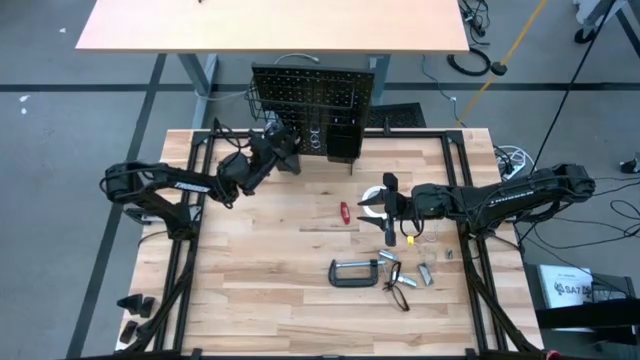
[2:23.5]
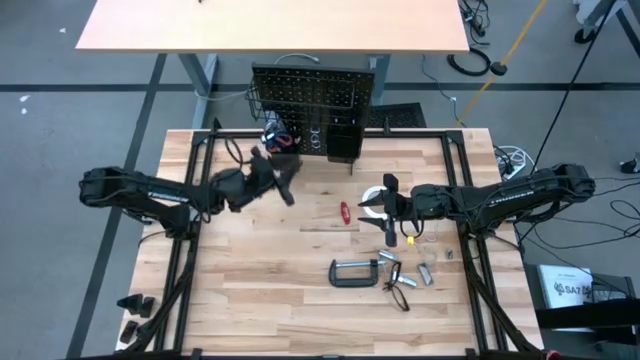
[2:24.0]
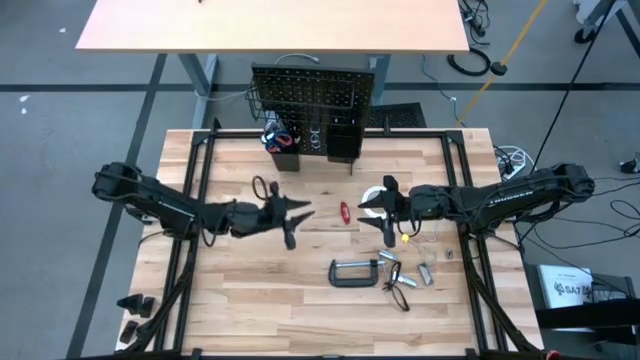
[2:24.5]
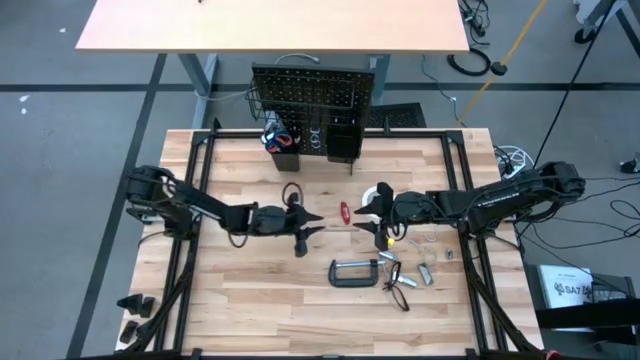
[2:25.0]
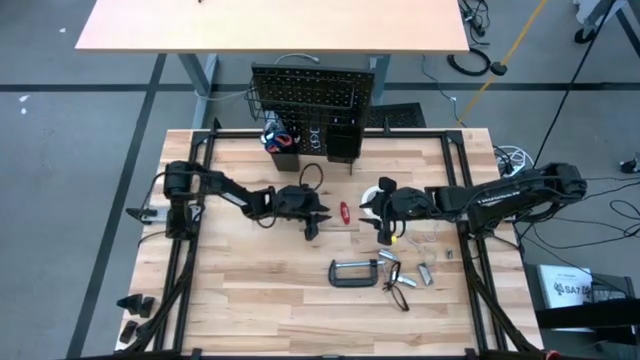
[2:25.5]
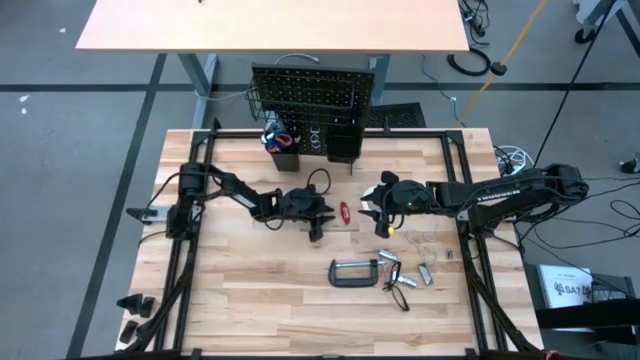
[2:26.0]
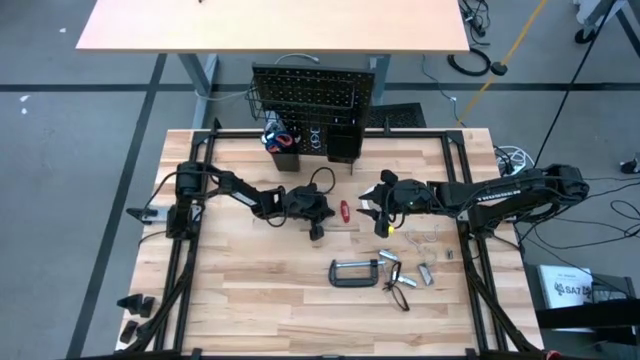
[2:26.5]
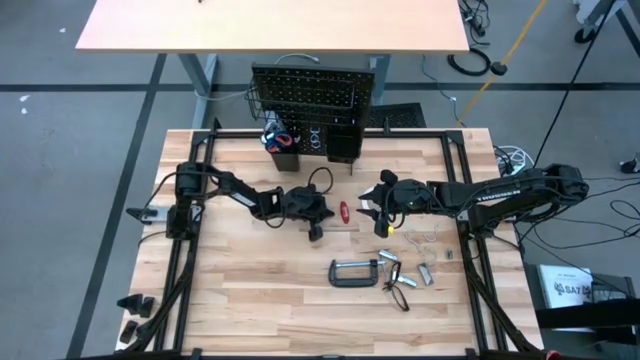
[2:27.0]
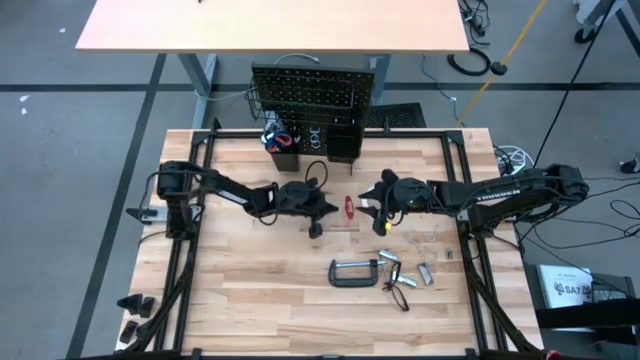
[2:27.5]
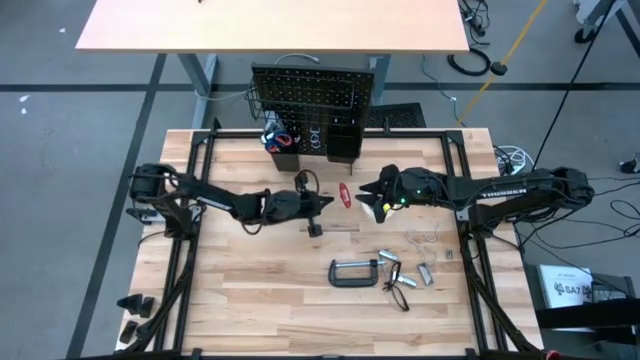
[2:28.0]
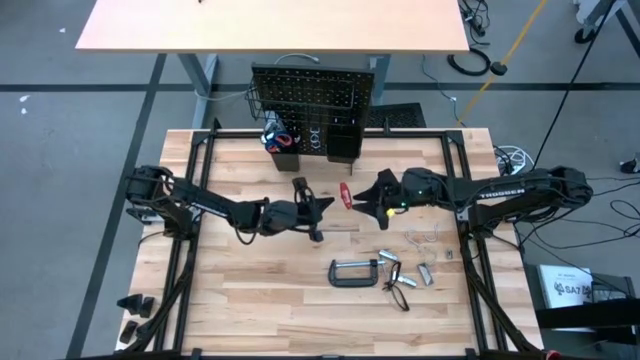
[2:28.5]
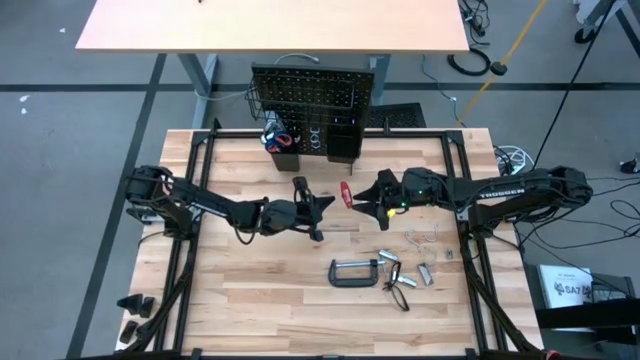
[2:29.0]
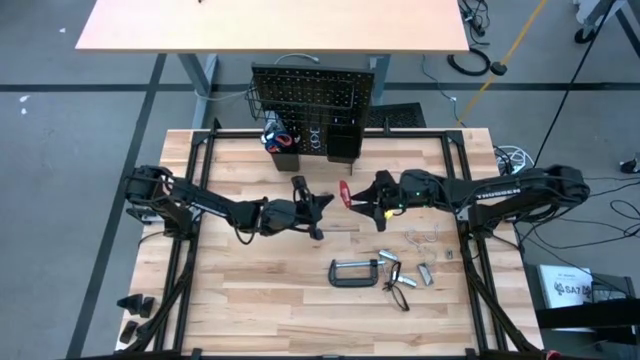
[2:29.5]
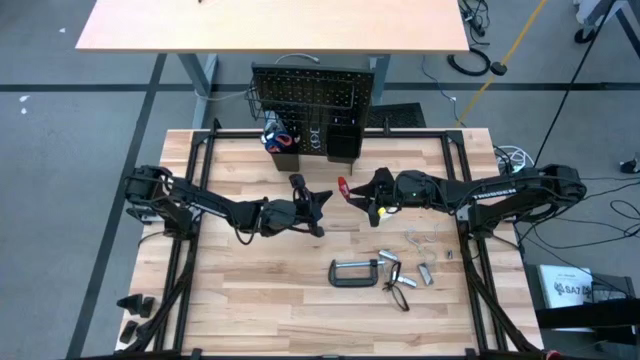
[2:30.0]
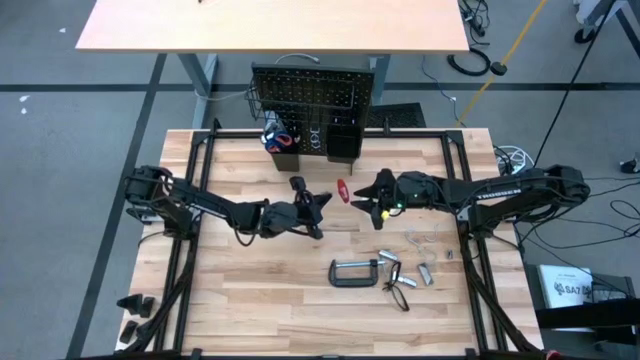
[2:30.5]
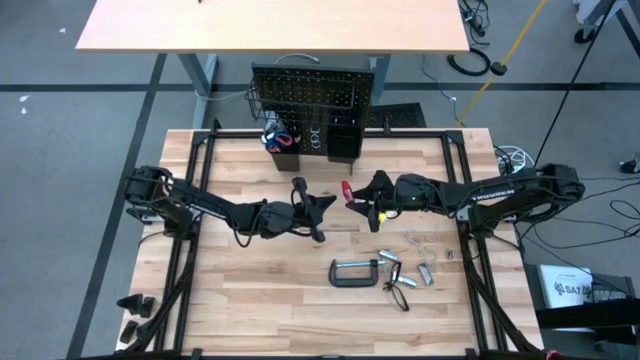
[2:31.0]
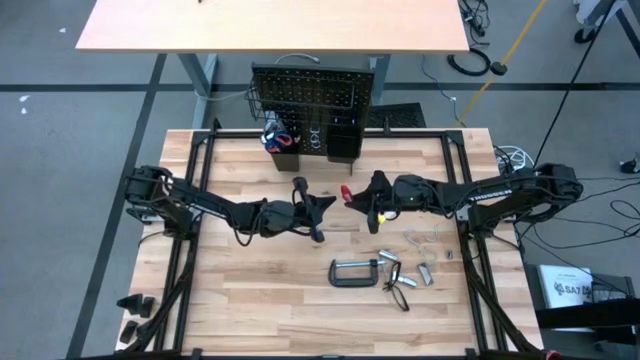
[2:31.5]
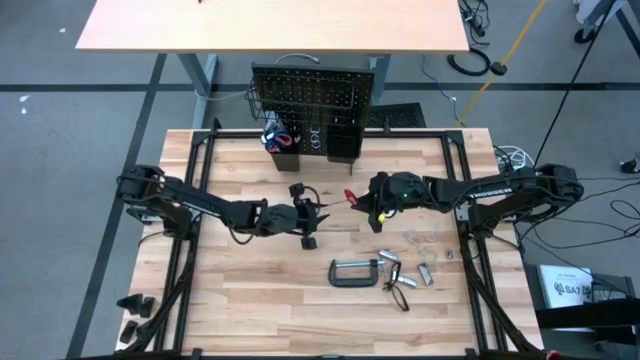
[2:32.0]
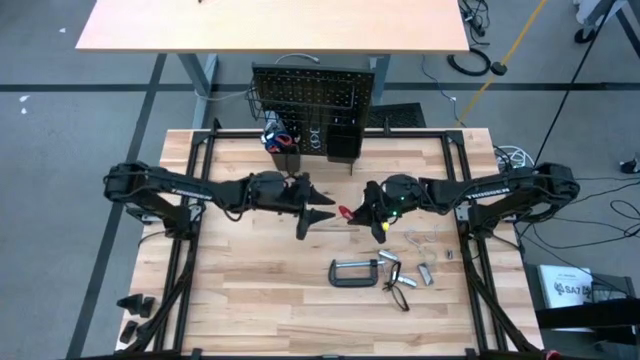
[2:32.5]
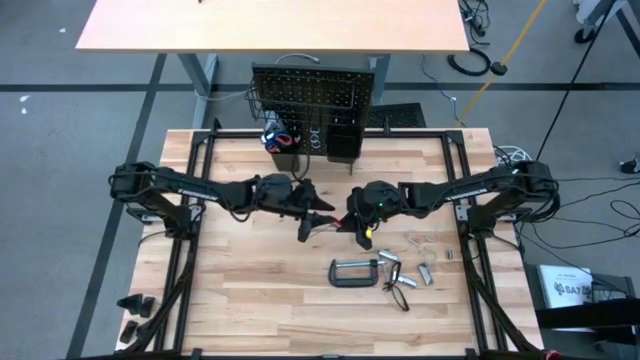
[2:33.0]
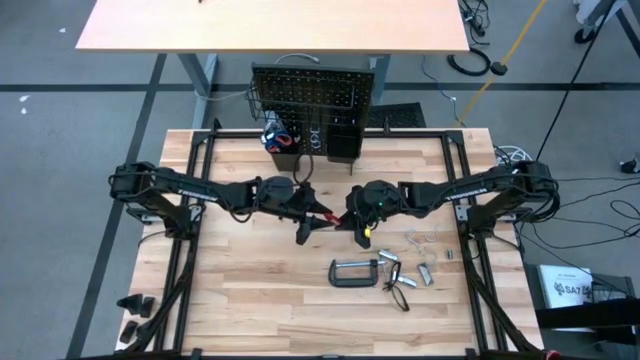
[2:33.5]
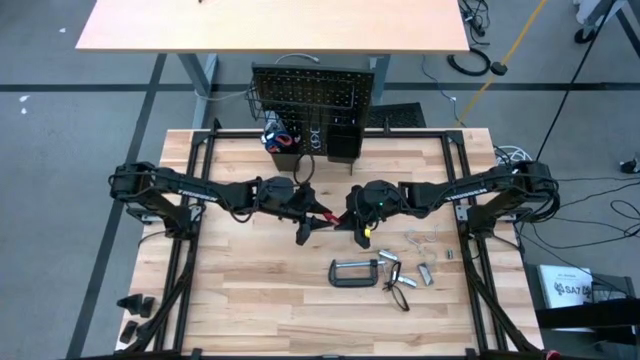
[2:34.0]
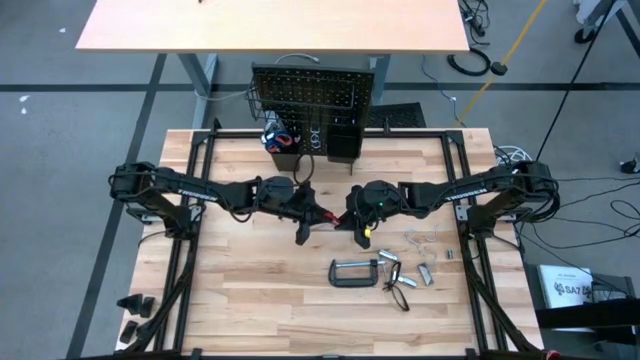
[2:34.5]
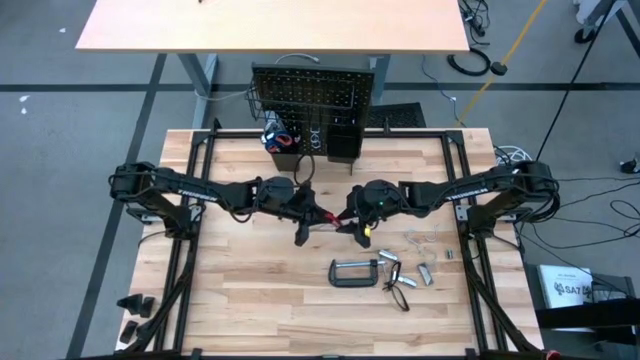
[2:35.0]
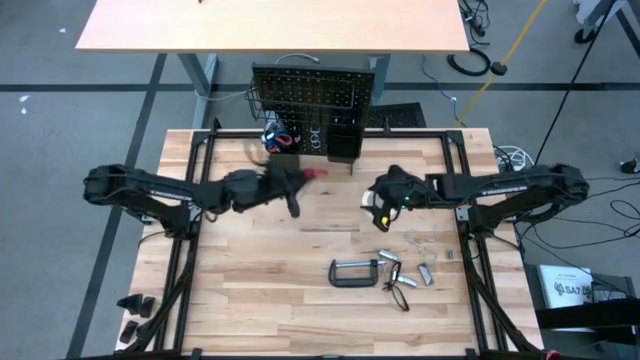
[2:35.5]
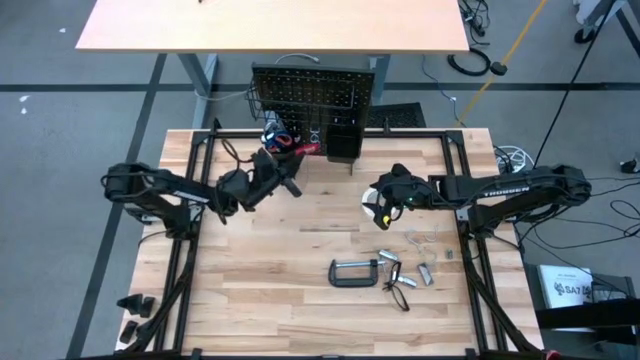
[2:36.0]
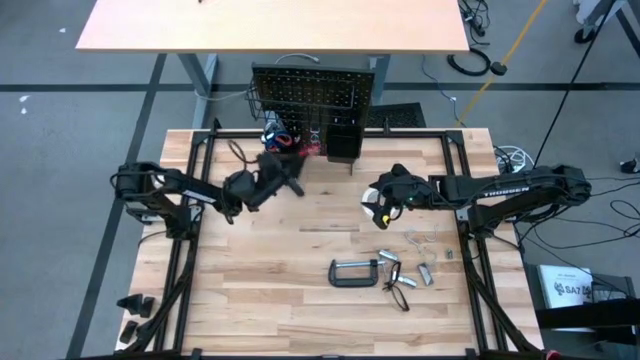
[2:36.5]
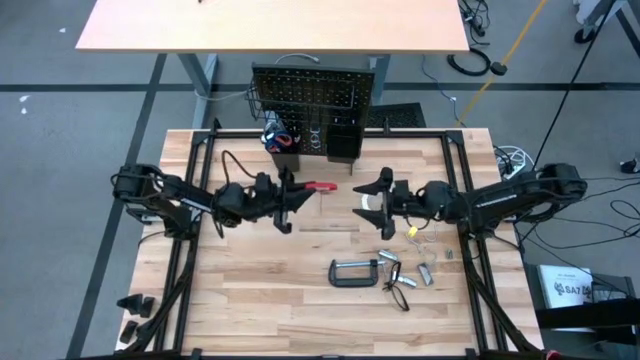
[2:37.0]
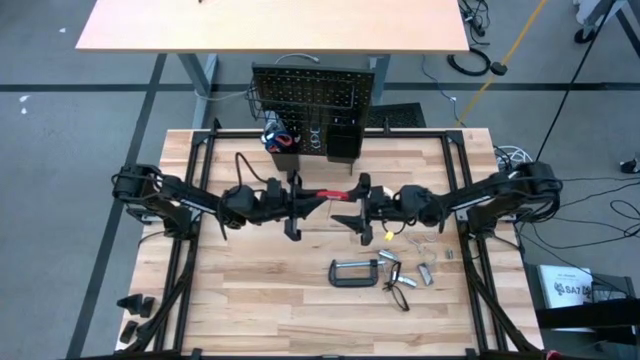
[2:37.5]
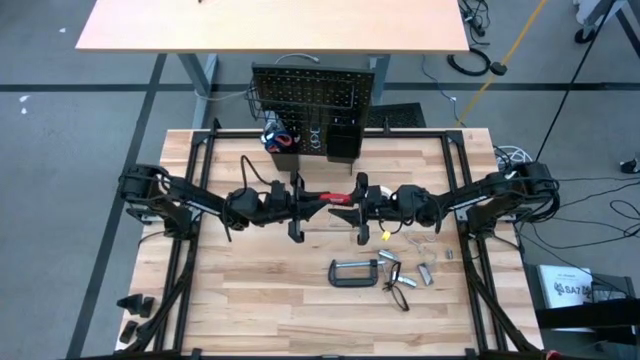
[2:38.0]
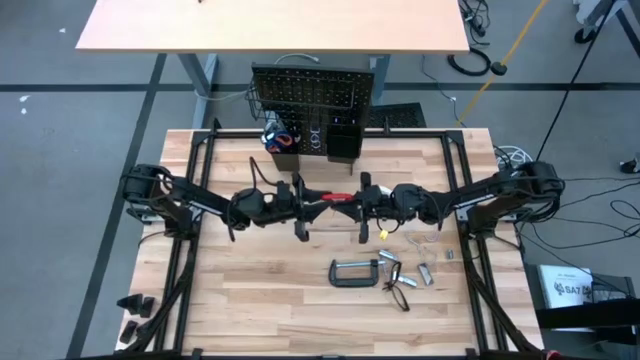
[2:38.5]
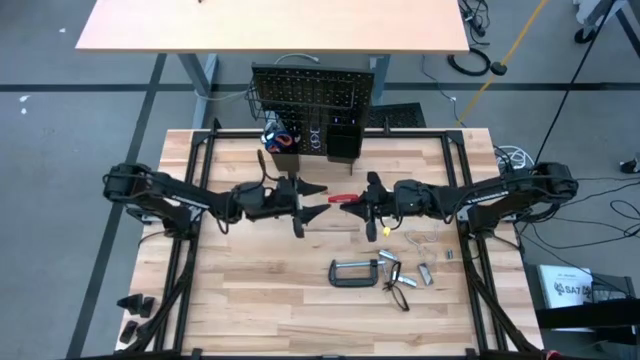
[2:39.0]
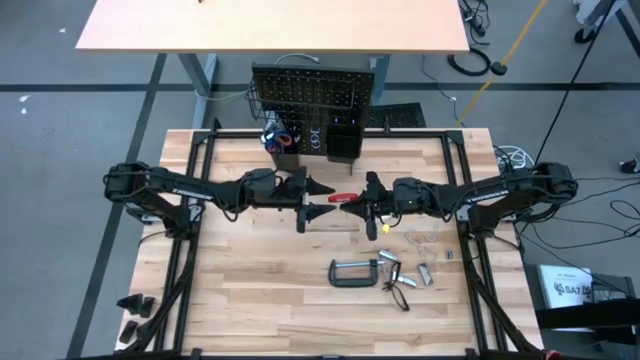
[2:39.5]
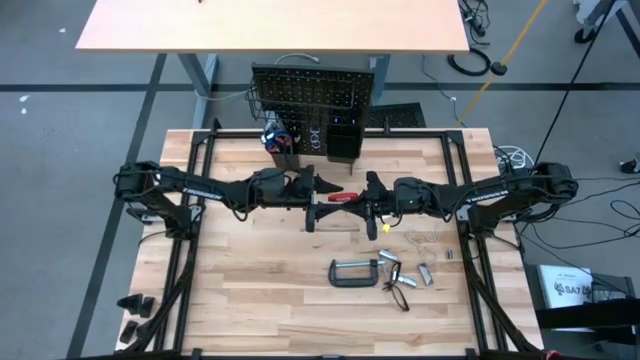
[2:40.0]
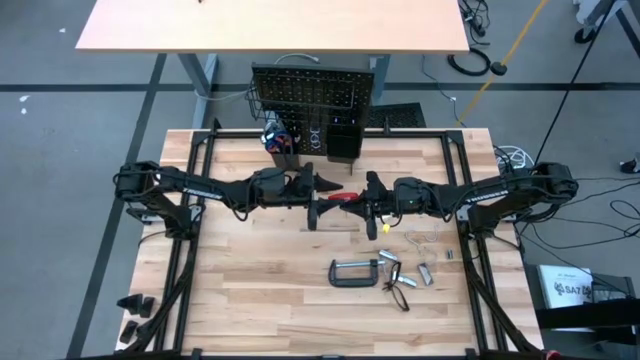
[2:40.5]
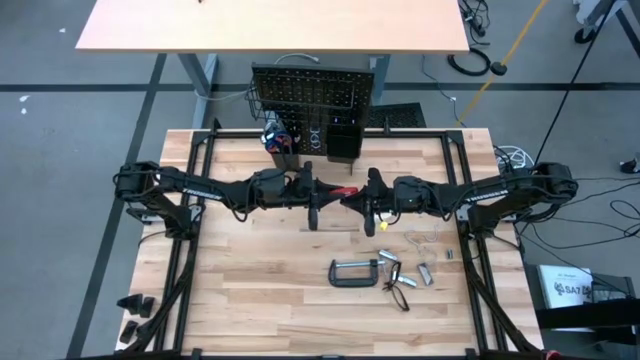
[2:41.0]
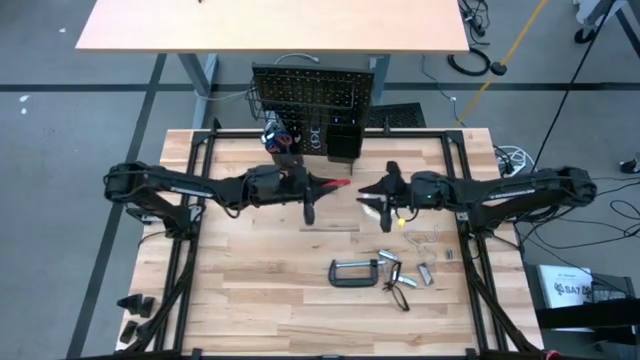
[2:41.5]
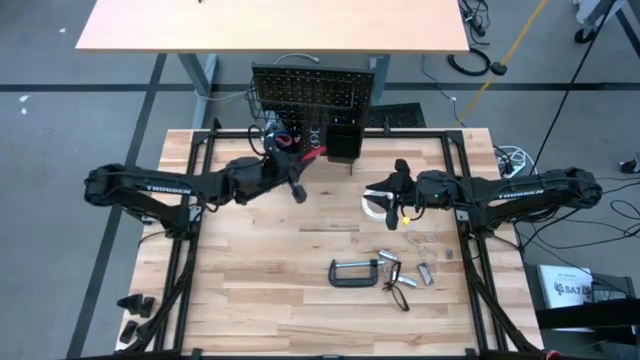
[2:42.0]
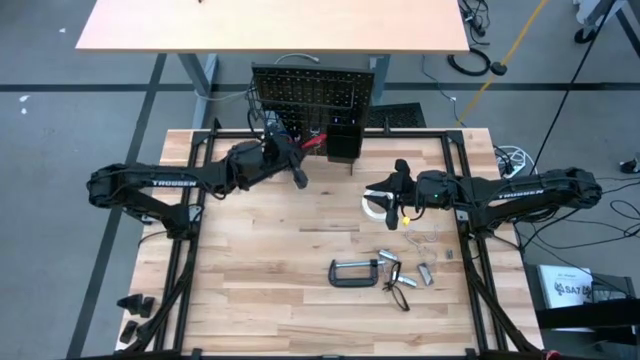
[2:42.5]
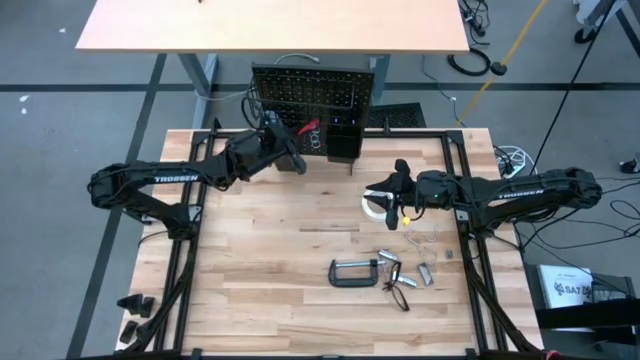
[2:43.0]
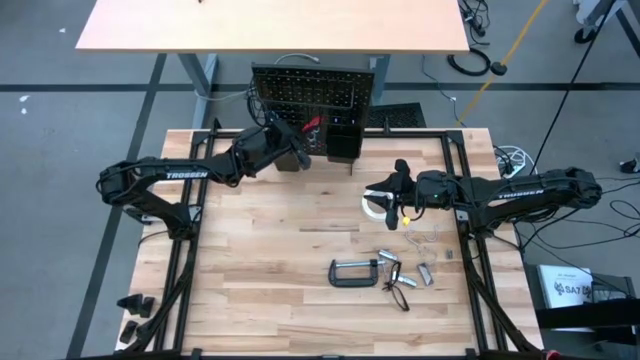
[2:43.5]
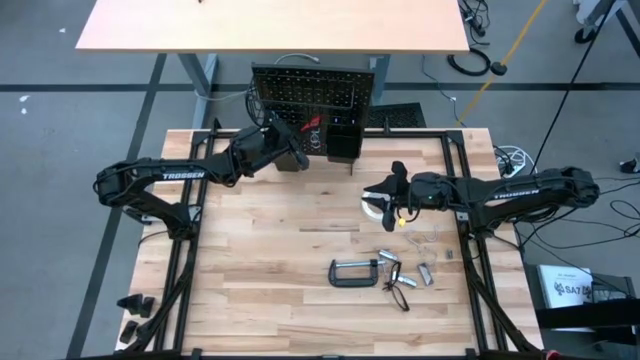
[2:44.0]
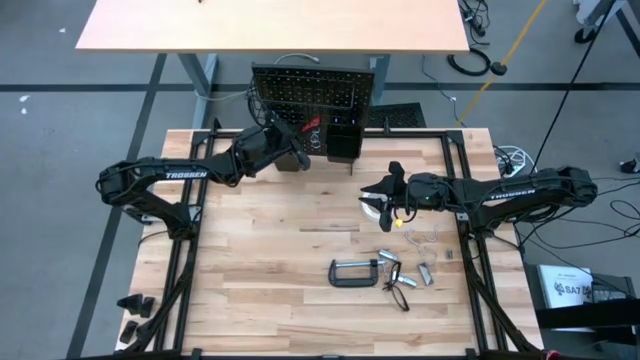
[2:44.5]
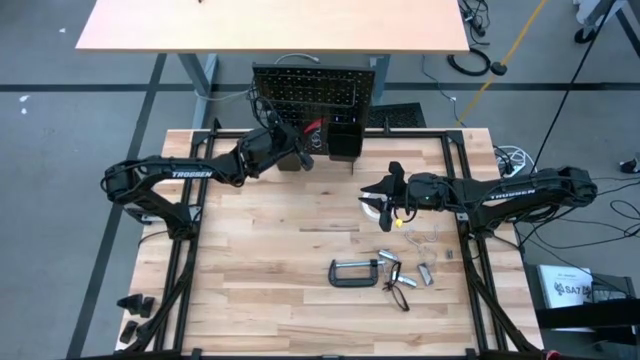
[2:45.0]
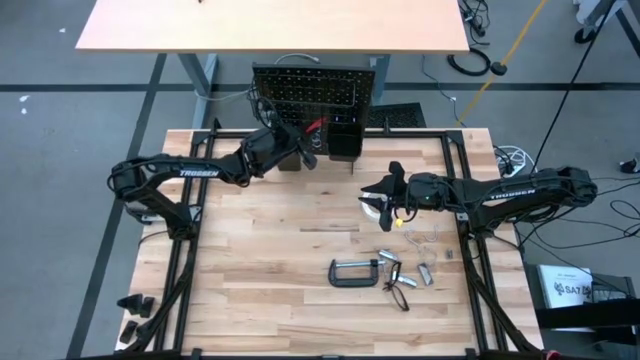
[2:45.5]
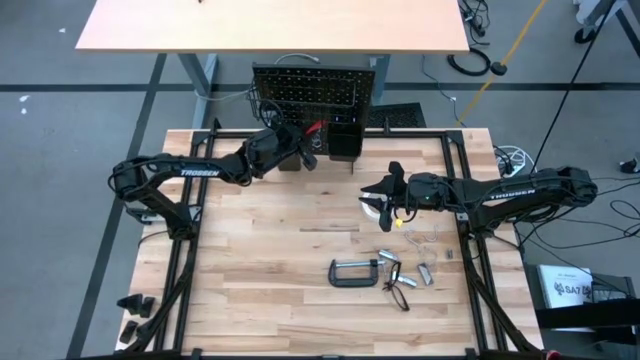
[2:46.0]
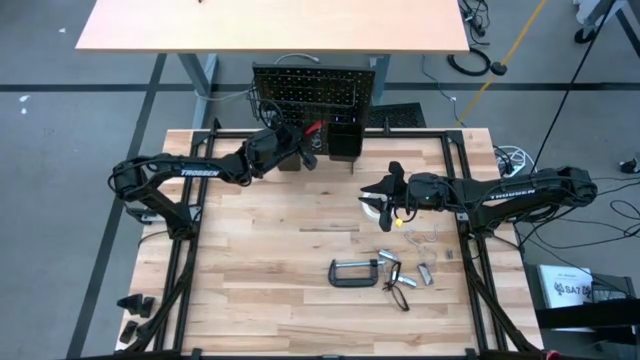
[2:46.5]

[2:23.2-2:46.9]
Task: Hang tools onto peg board
Hang the red allen wrench on the pegboard
